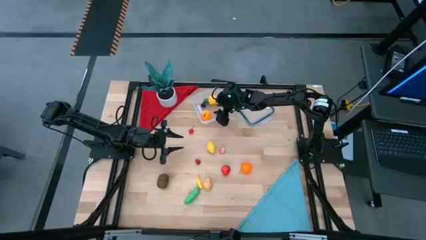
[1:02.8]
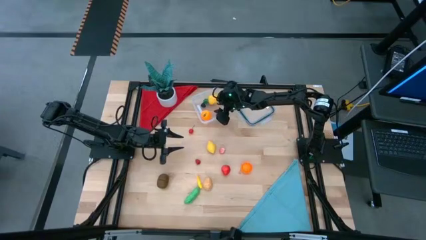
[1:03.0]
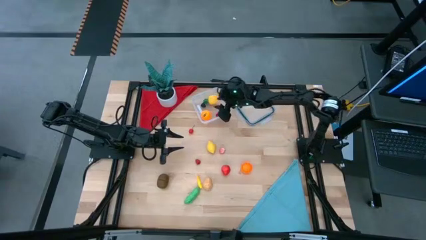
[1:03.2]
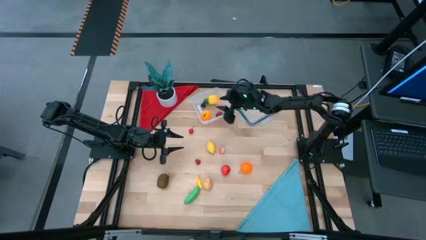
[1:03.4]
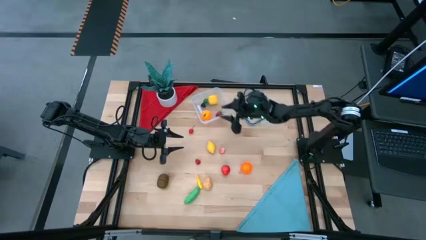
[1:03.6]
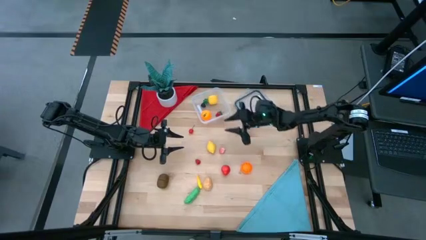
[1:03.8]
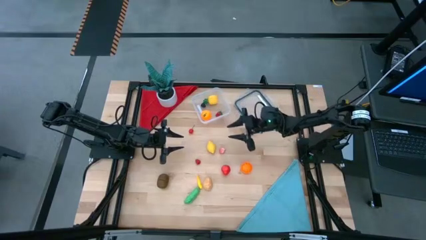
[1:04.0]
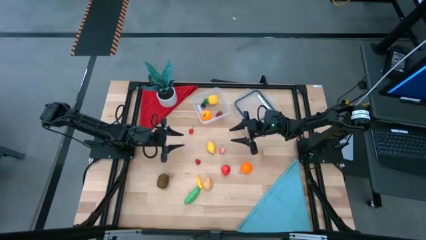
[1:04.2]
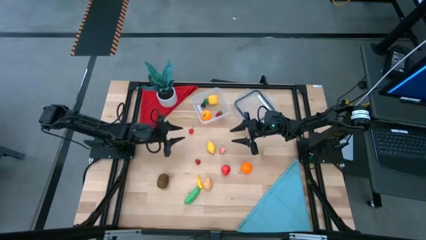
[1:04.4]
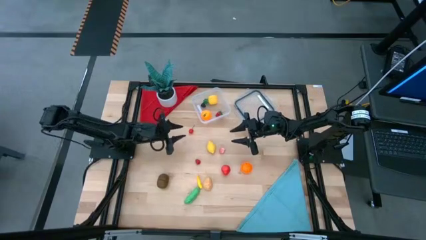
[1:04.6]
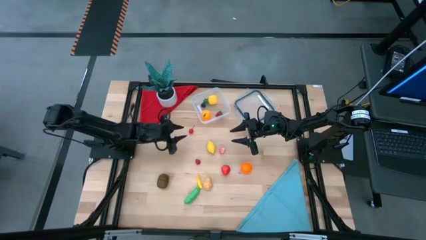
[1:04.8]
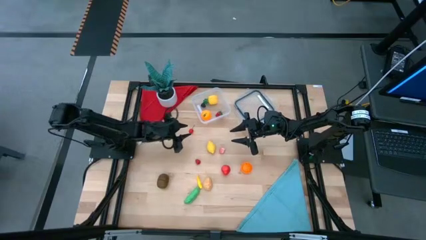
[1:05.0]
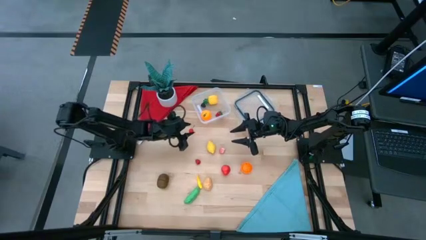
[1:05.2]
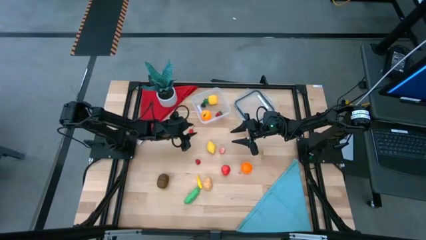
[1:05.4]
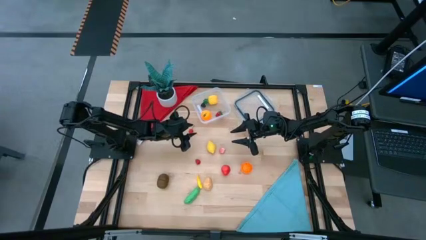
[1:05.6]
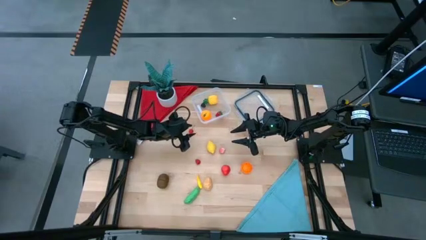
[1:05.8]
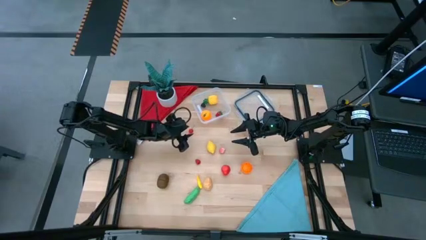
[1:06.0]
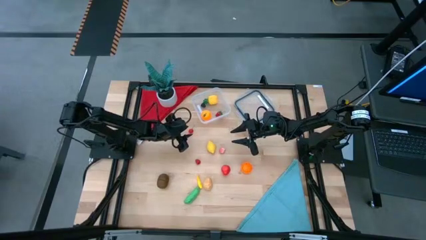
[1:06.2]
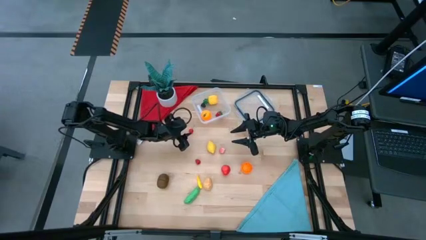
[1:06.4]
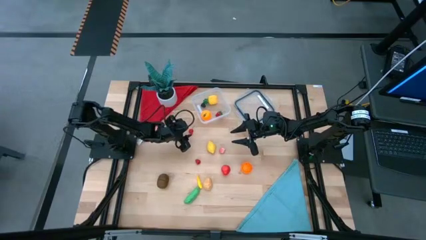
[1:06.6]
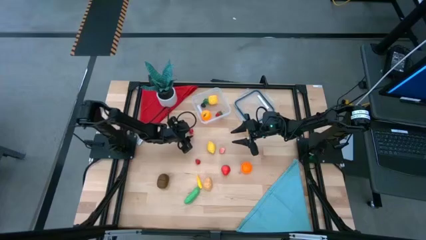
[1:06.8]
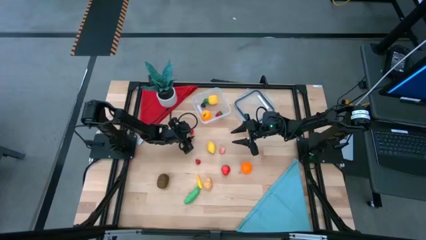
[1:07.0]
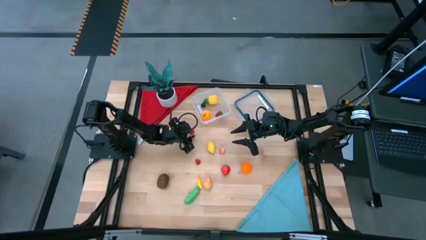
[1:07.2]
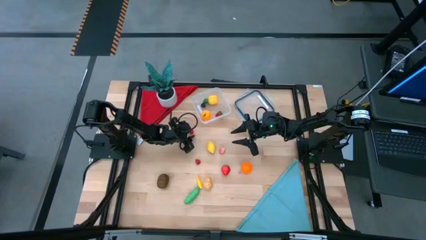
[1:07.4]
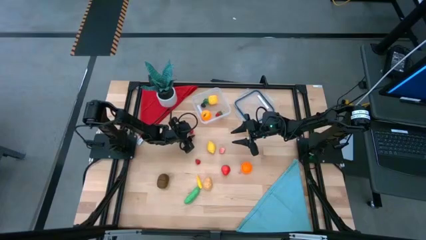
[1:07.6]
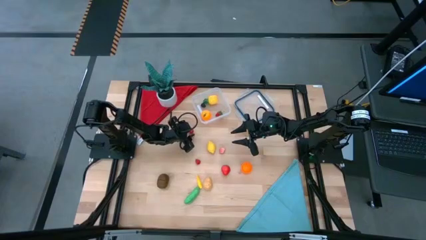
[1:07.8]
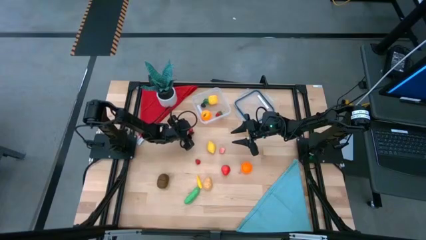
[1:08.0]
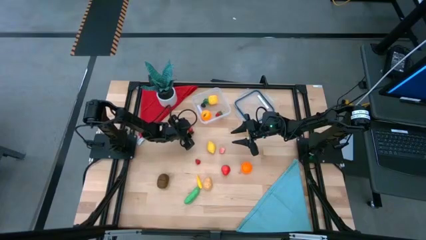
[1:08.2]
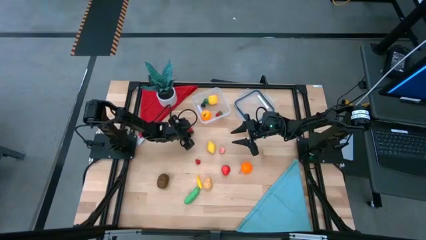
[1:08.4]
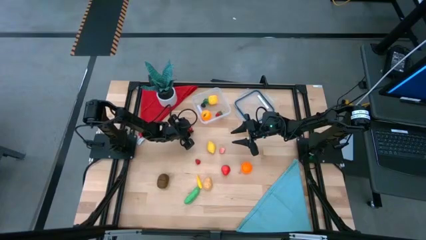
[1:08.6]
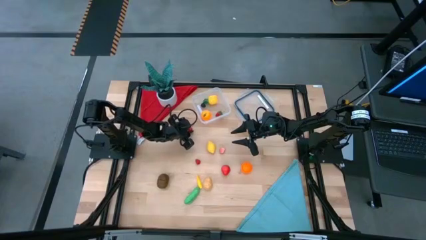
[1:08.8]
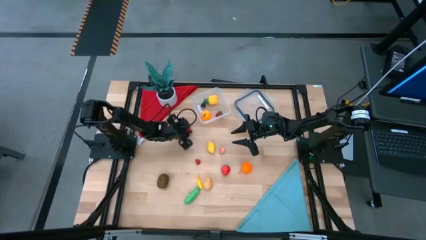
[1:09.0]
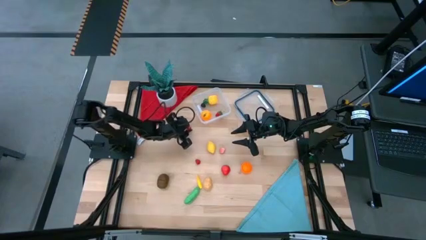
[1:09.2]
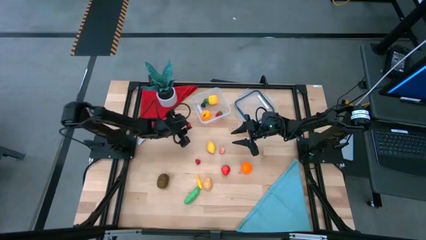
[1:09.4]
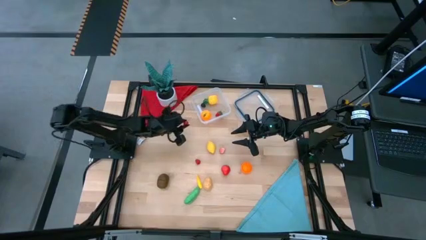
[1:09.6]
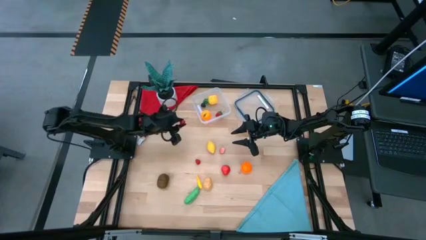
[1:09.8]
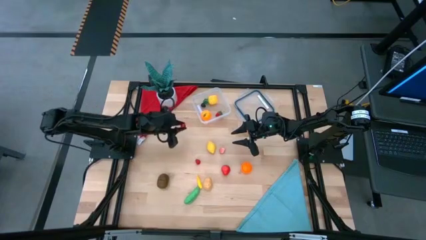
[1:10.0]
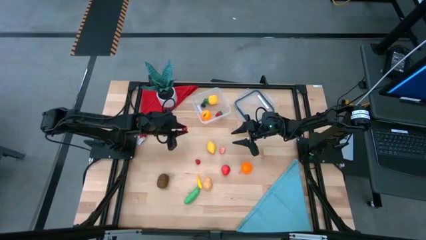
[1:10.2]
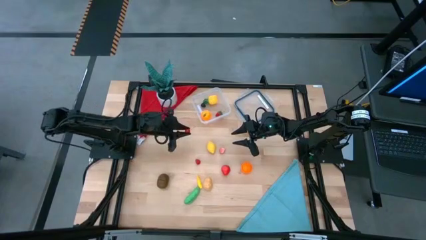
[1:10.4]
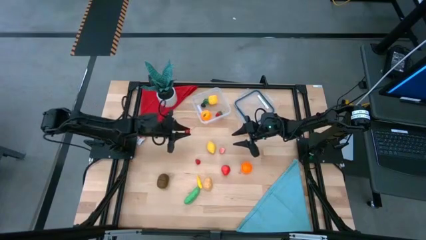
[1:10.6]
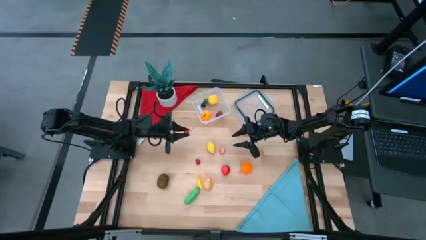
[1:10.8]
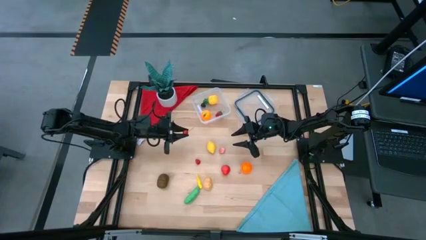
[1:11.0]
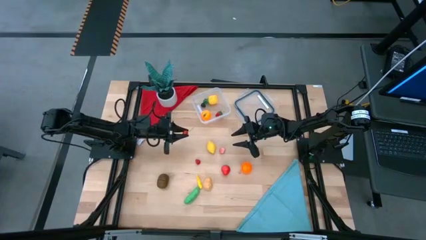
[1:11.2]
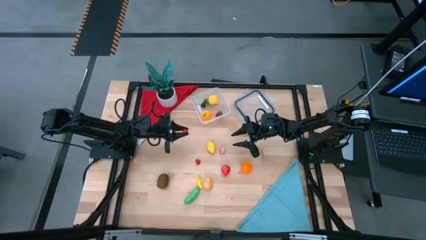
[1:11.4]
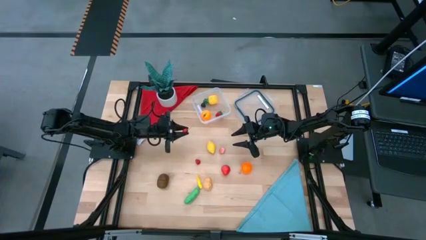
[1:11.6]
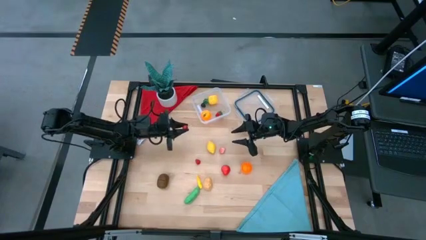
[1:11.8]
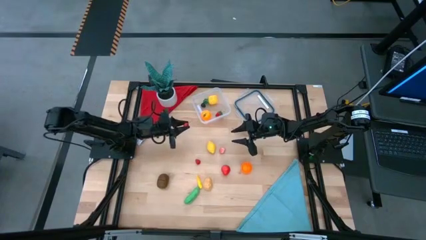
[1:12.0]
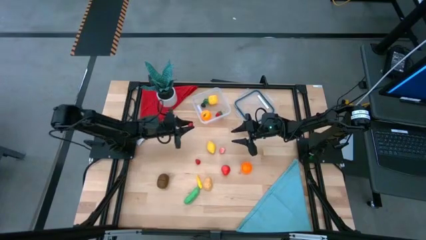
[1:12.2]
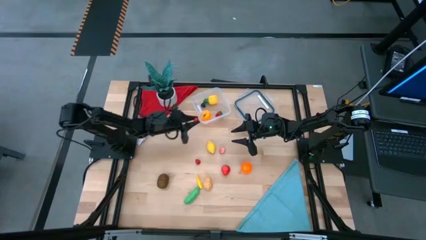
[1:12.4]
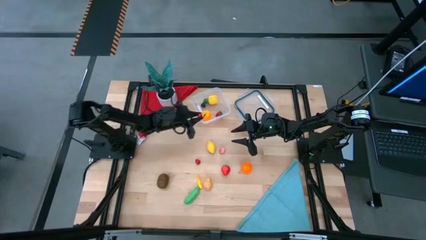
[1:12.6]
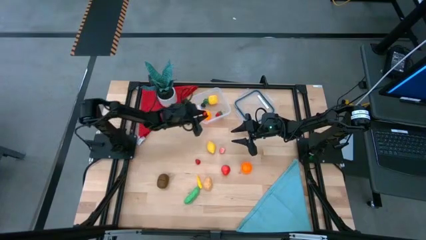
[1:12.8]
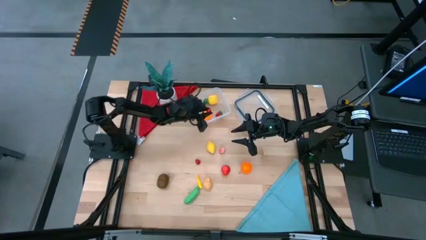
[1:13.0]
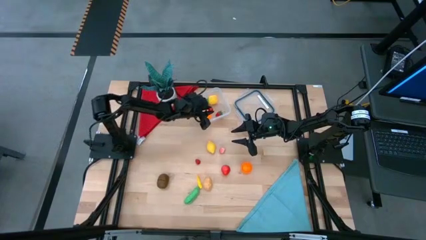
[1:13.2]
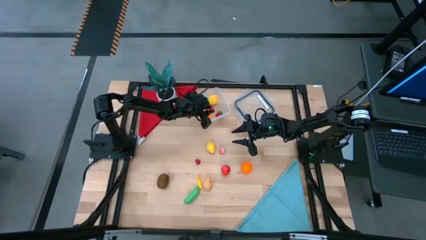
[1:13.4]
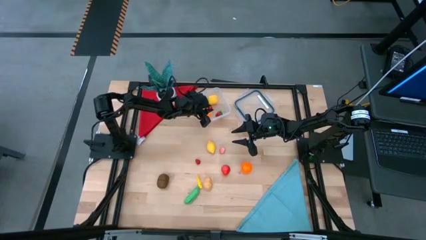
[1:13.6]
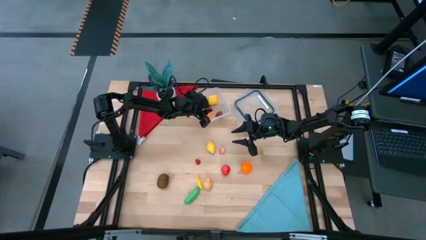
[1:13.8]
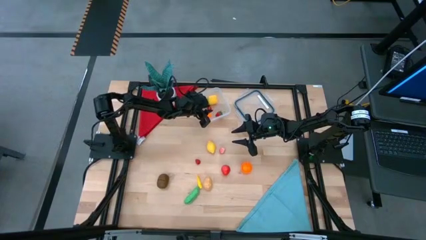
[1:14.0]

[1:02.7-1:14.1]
Task: Pick and placing Produce into tupperware
Put the red cherry into the transparent container

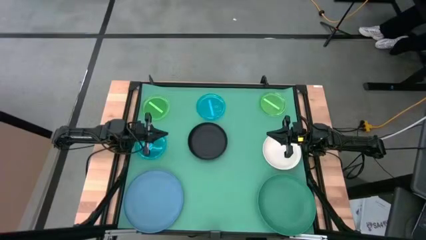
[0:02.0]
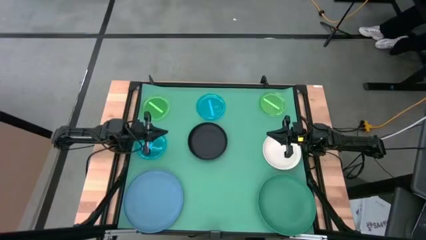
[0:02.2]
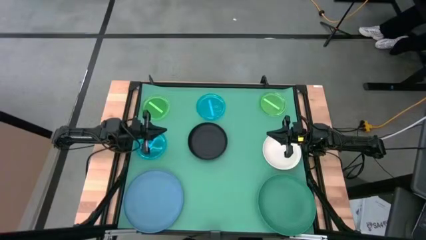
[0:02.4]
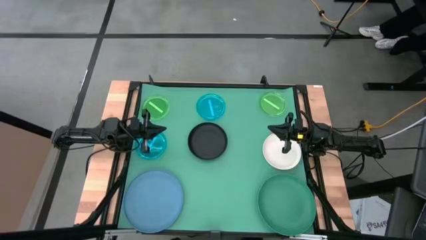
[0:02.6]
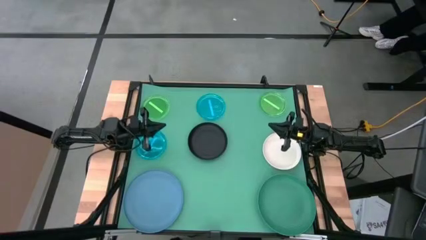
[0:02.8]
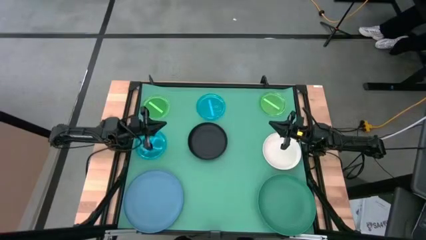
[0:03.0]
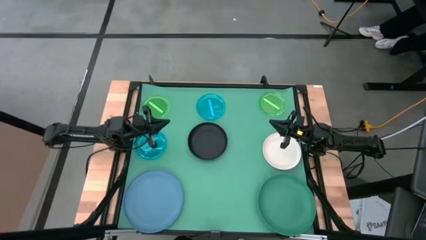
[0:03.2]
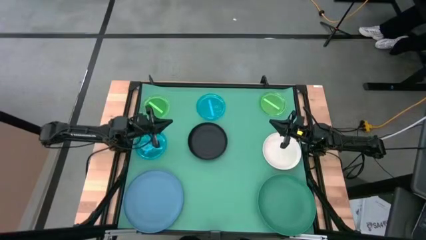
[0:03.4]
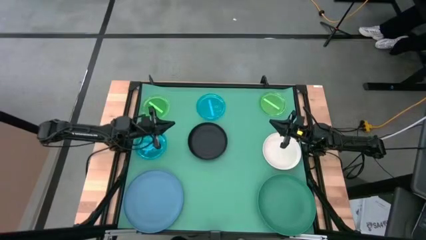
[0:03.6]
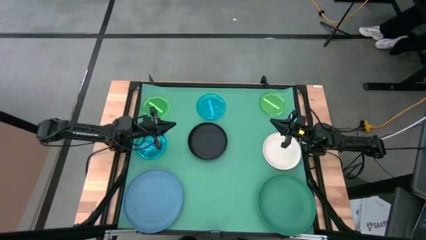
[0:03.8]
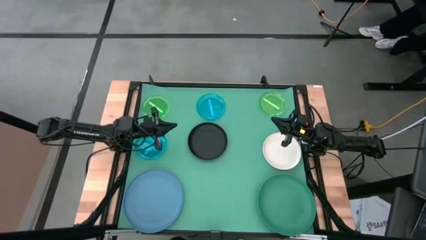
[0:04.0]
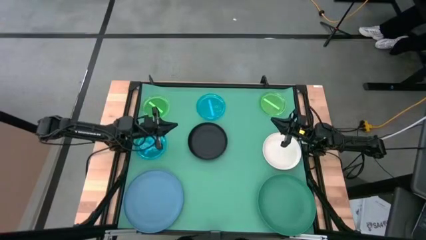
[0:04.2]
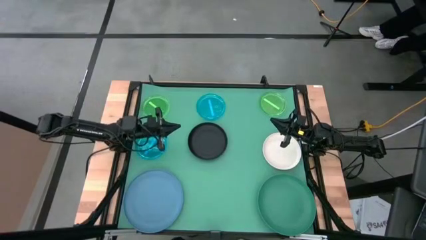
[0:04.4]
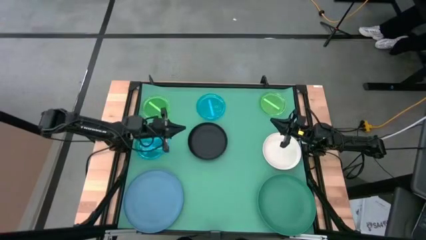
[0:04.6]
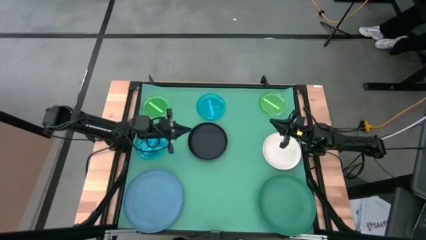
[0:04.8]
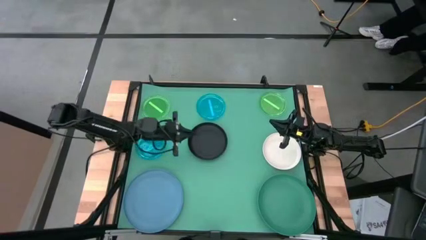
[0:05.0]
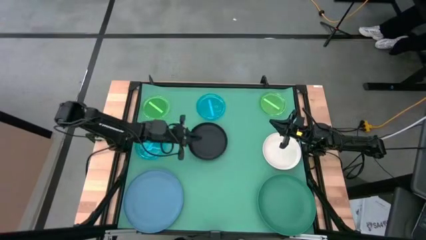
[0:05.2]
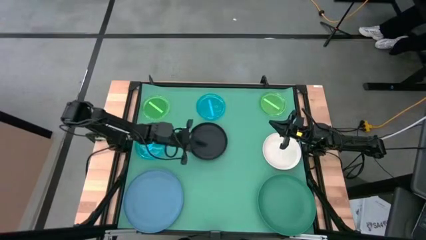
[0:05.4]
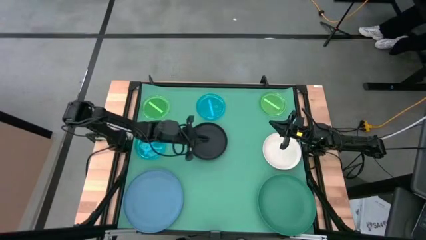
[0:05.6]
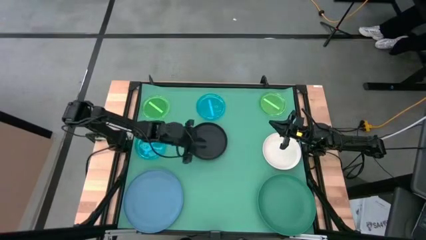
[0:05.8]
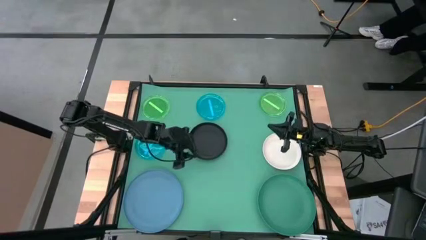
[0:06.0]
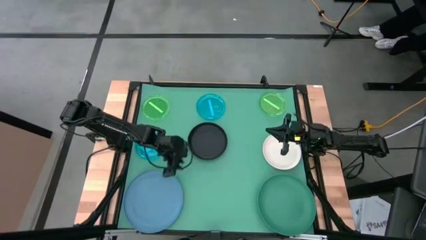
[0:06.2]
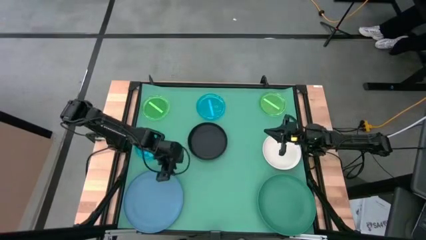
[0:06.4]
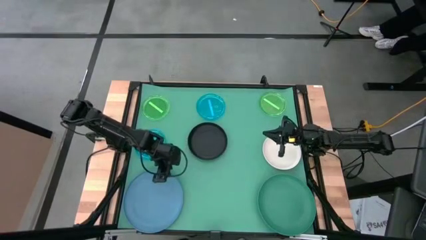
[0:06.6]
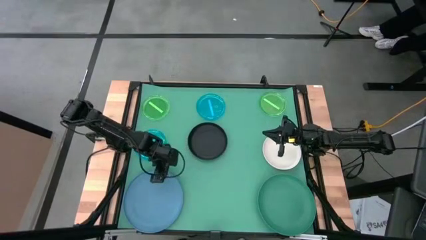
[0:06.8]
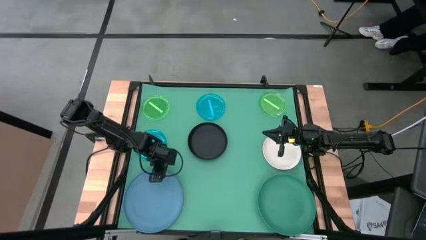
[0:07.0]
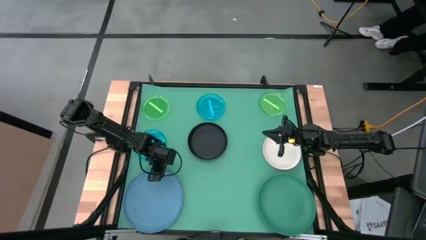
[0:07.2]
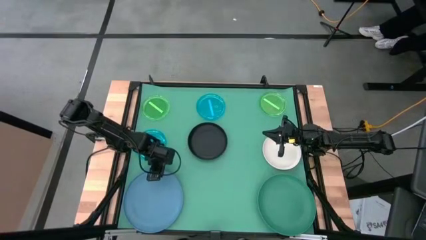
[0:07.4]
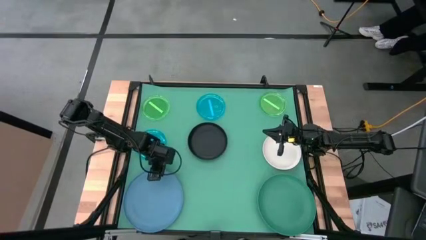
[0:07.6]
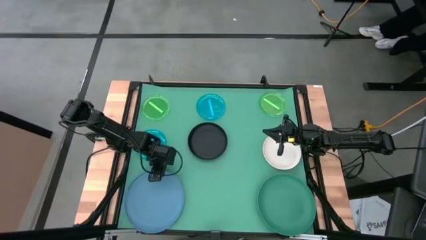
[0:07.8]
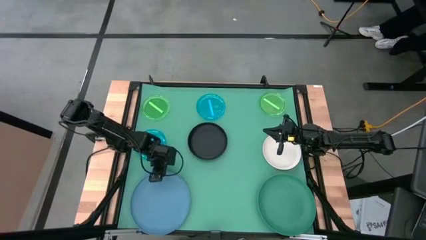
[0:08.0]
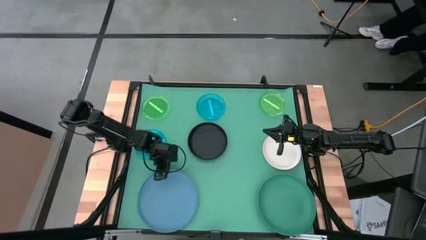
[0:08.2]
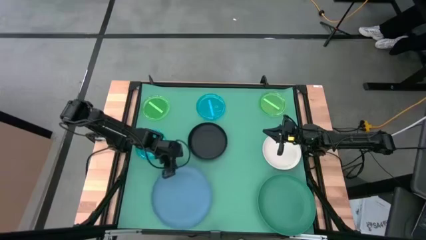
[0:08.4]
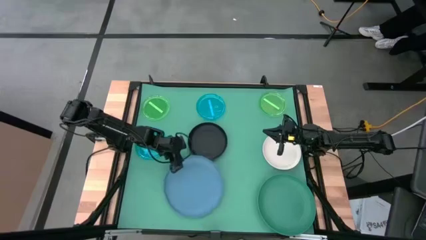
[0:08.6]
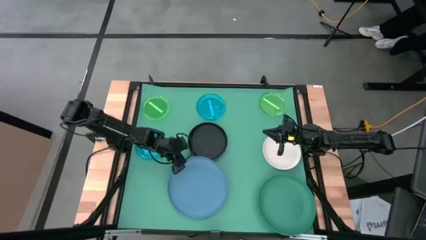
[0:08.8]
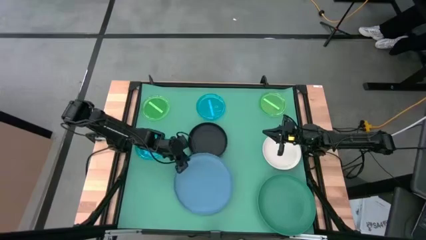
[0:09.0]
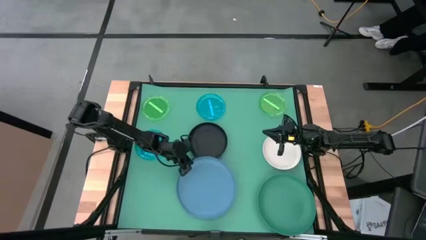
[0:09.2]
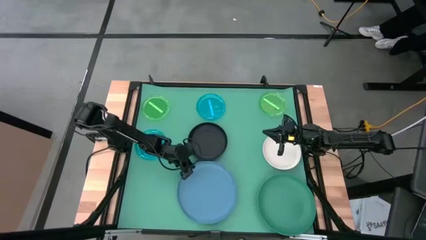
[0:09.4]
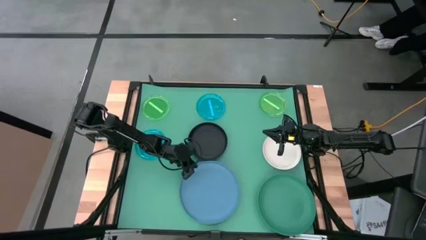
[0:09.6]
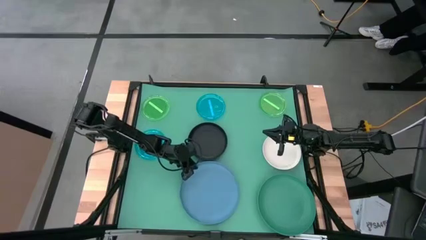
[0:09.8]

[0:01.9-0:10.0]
Task: Stack plastic plates
Move the blue plate to the bottom center of the table
